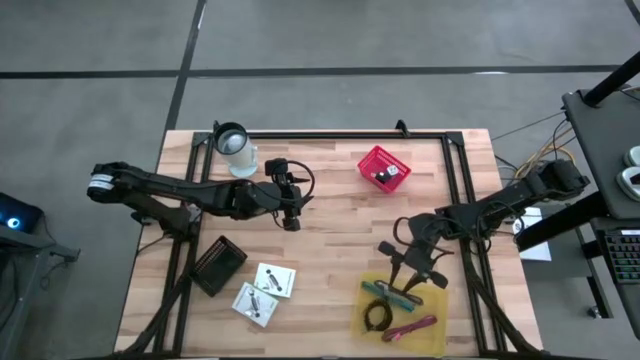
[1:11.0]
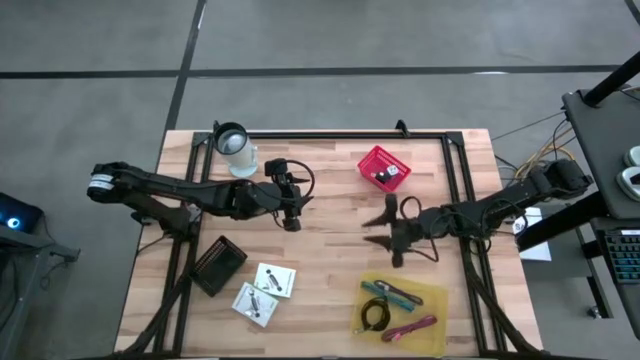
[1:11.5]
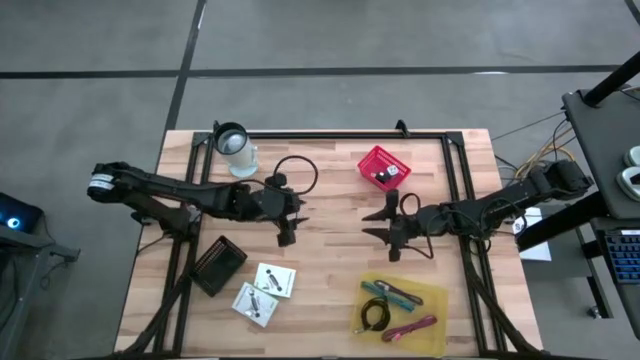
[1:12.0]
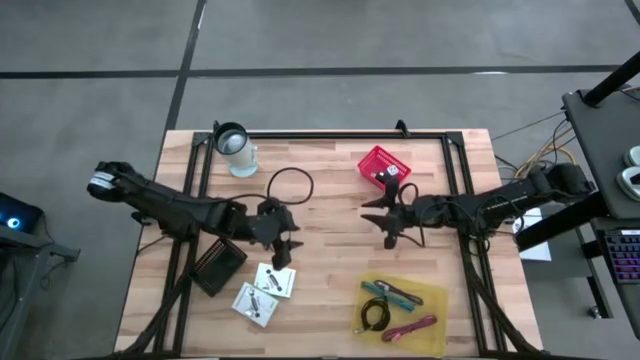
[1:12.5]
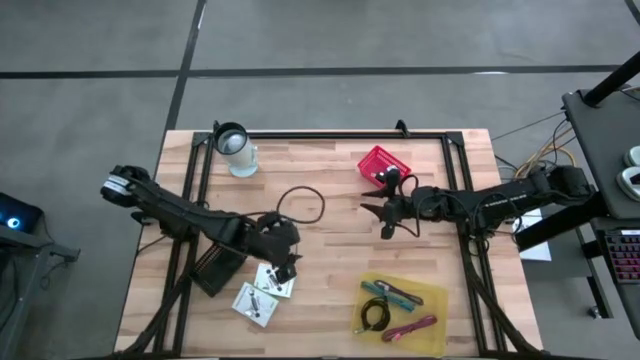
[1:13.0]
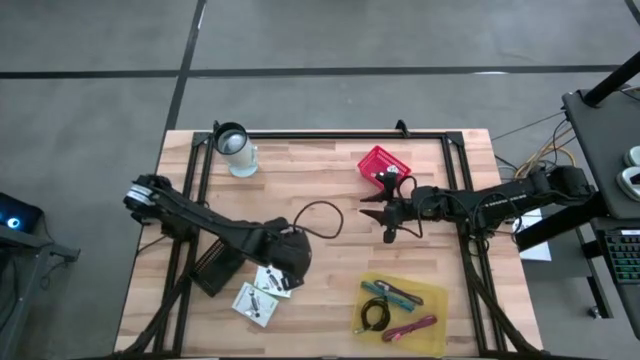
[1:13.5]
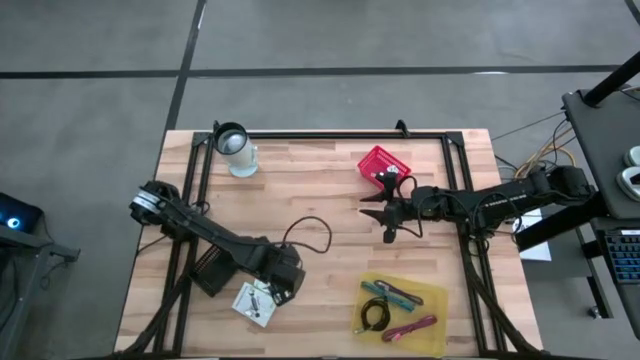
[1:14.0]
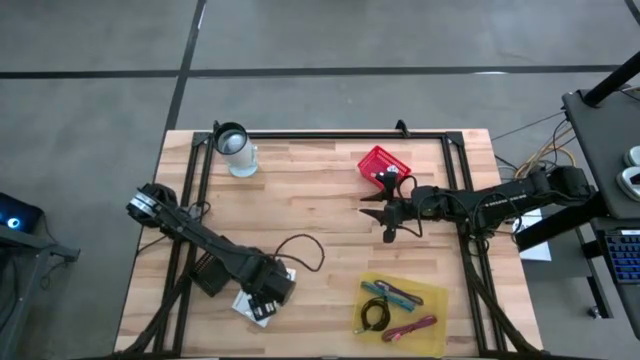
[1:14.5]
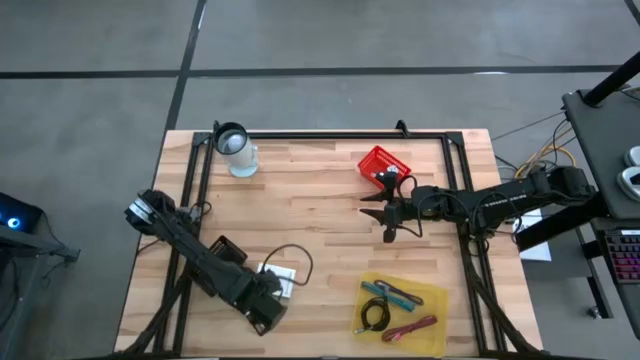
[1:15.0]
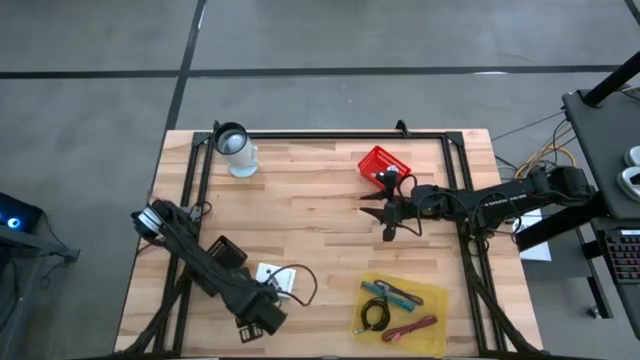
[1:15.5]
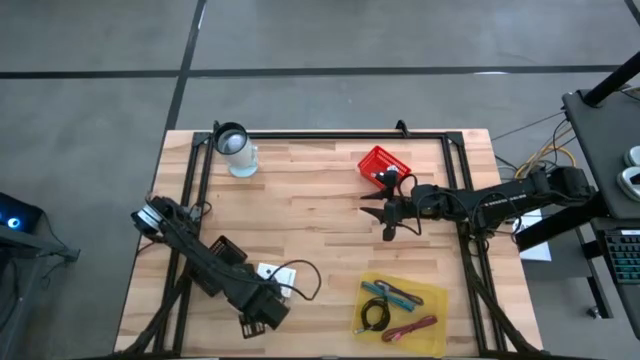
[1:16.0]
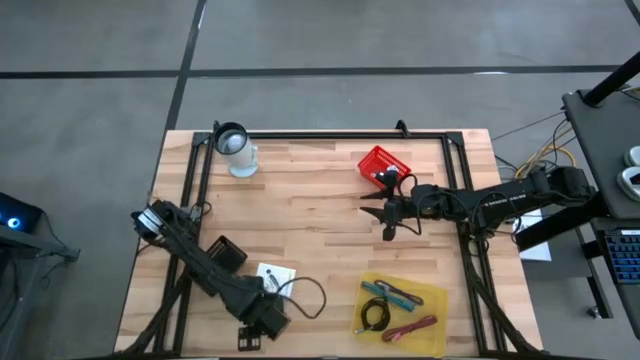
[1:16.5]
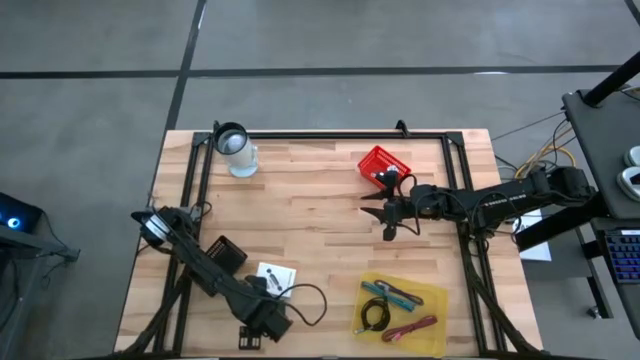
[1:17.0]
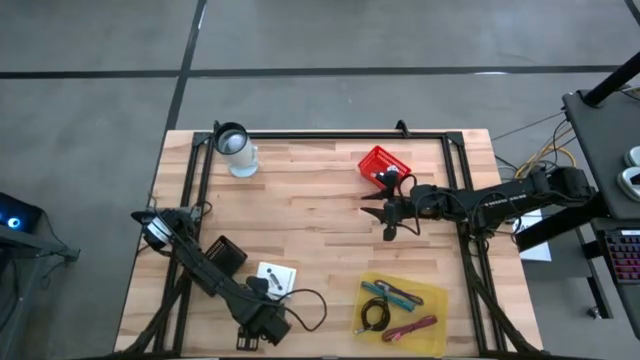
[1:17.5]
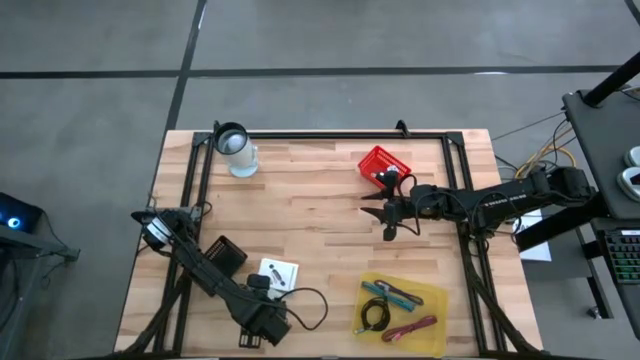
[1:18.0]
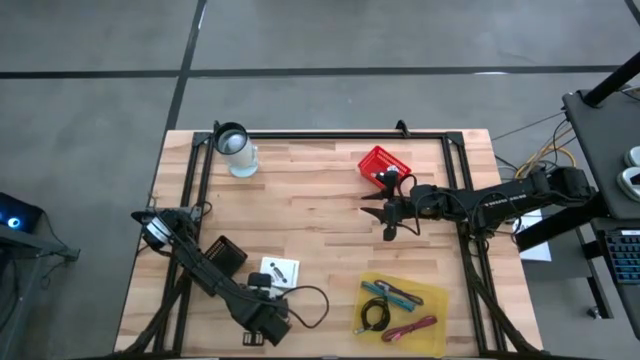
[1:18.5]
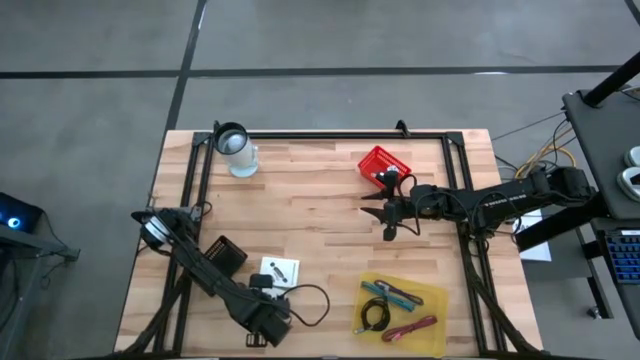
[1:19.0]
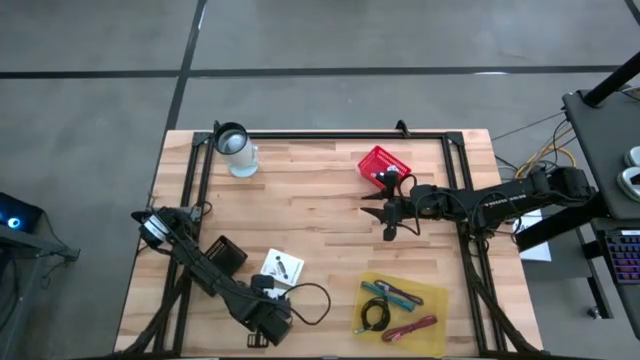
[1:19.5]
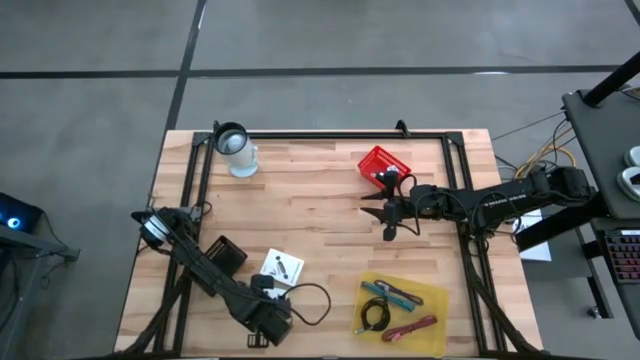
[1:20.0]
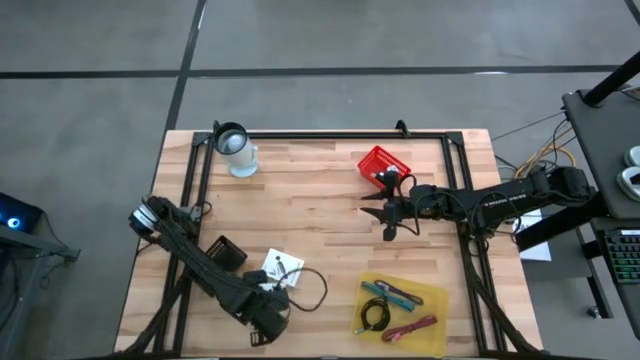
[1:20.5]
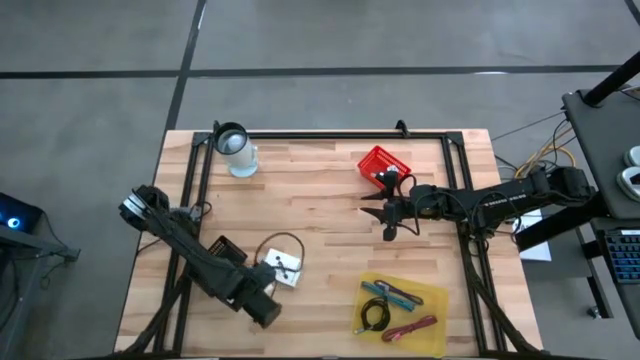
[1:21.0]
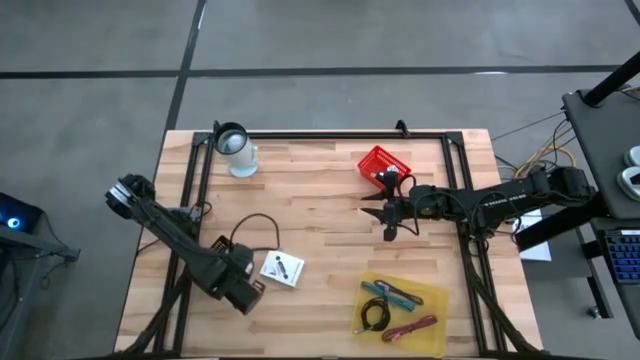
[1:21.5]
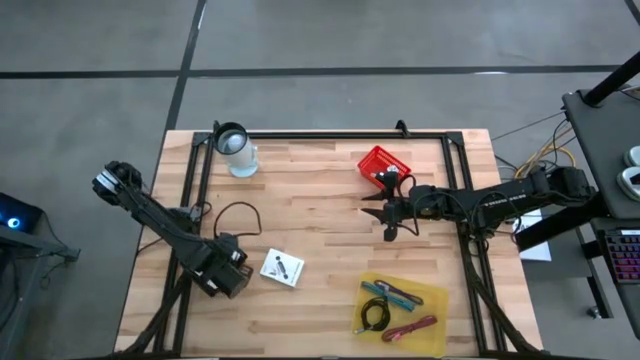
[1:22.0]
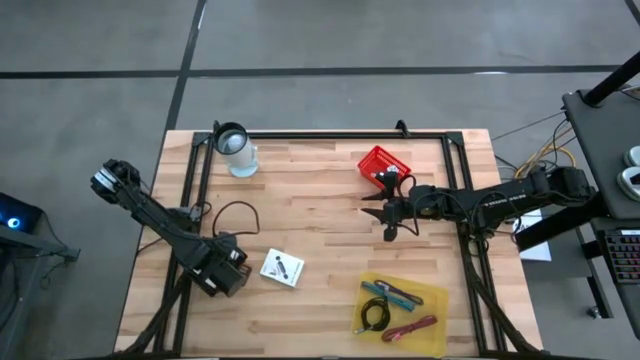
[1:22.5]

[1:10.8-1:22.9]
Task: Pick and place items into bin
Put the bottom white card reader box into the black bin

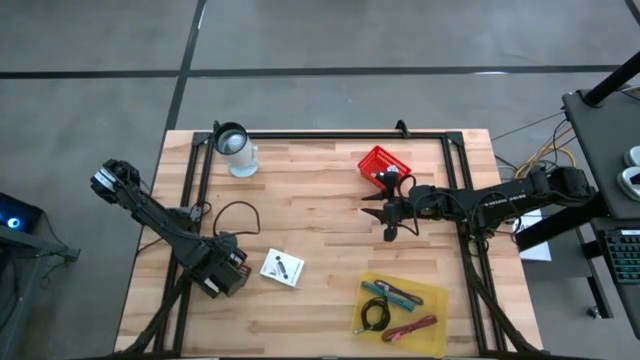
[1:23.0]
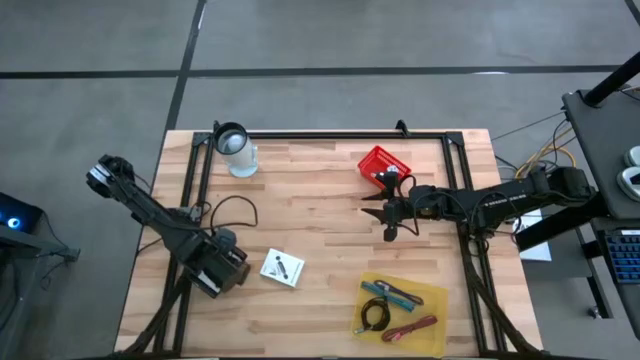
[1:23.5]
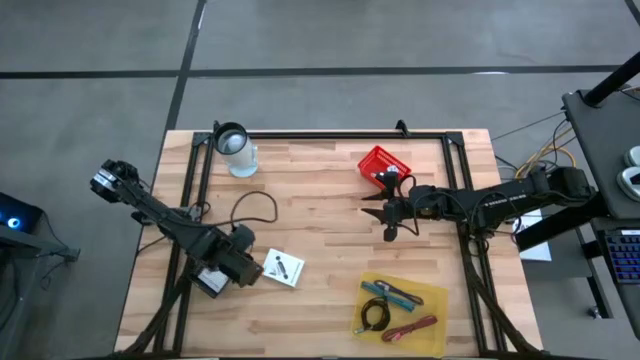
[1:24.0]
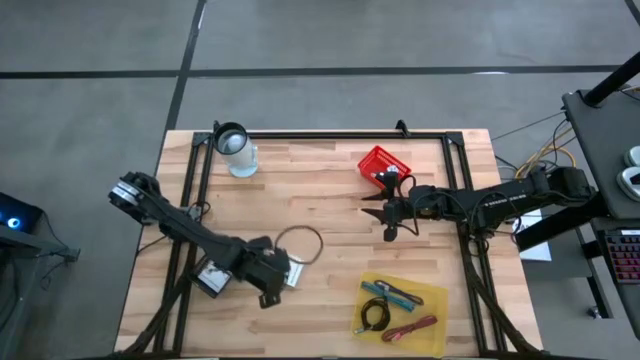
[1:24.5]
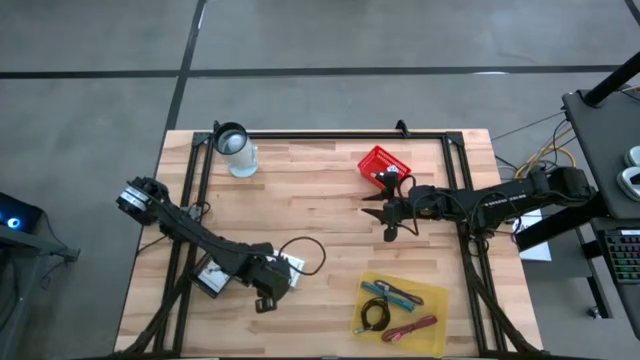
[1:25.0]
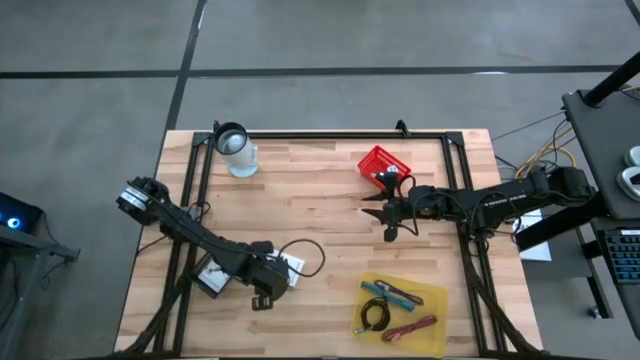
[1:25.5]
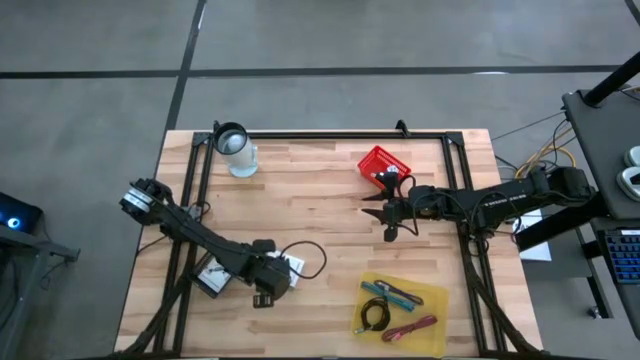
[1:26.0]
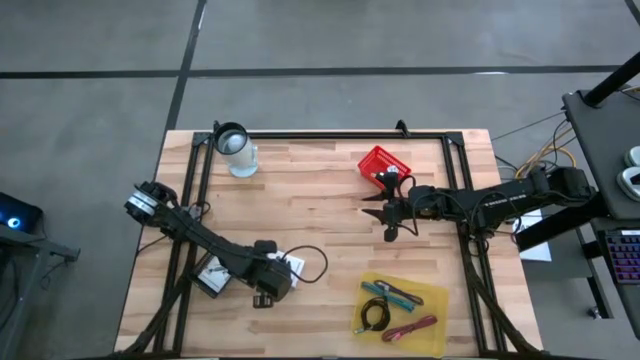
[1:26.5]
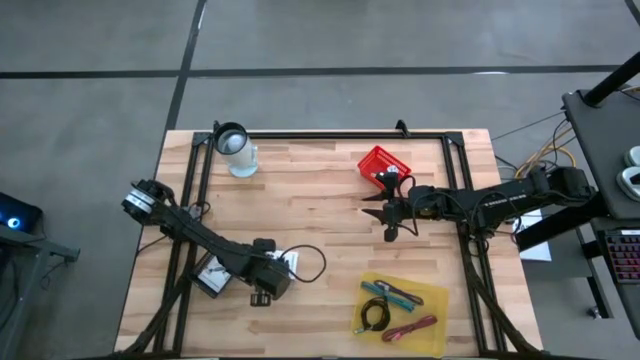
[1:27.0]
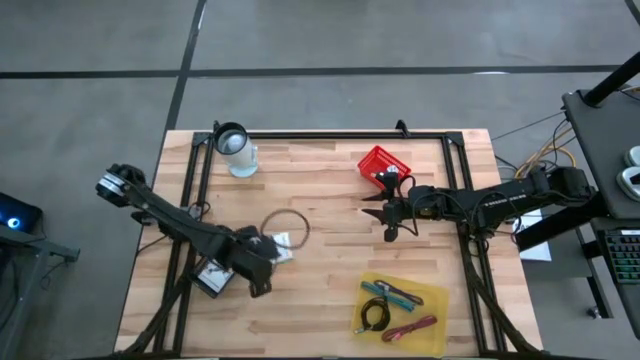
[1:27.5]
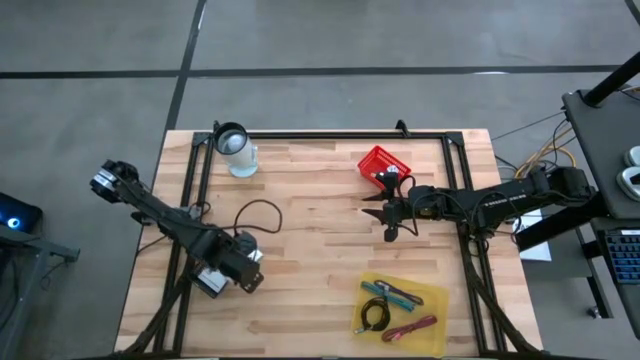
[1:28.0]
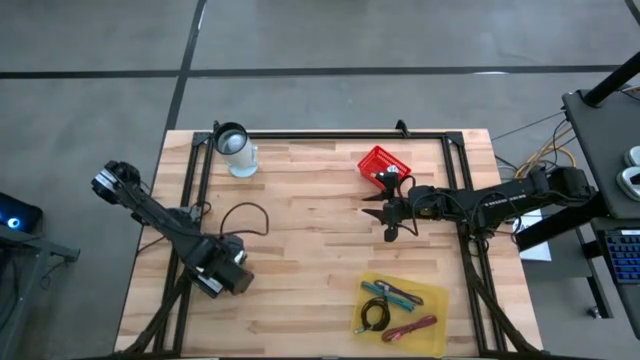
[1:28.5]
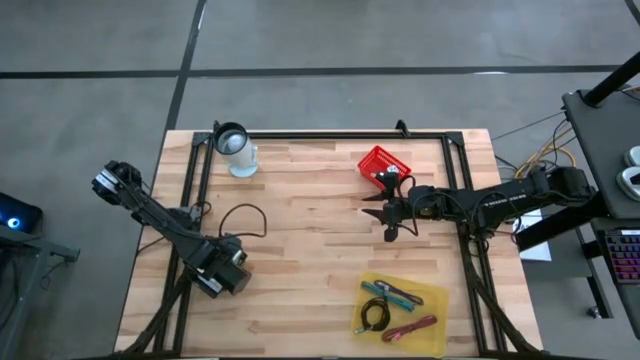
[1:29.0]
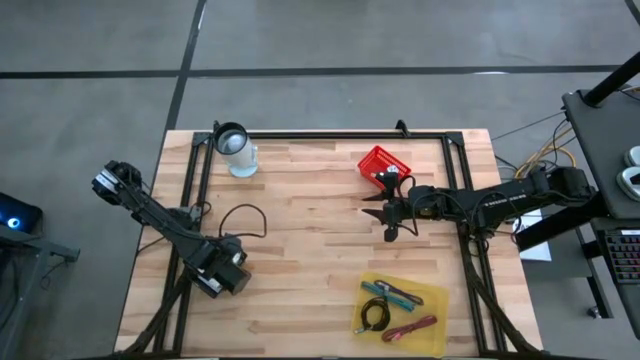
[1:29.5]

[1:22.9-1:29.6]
Put the white card reader box into the black bin

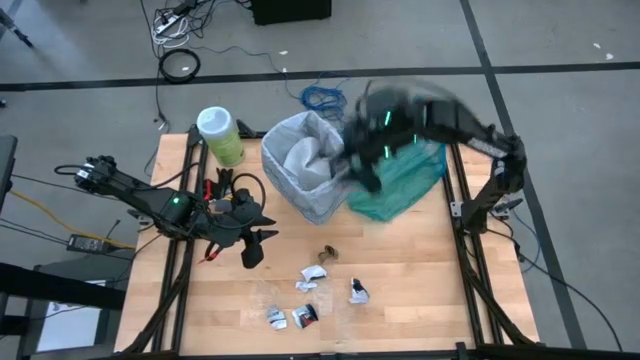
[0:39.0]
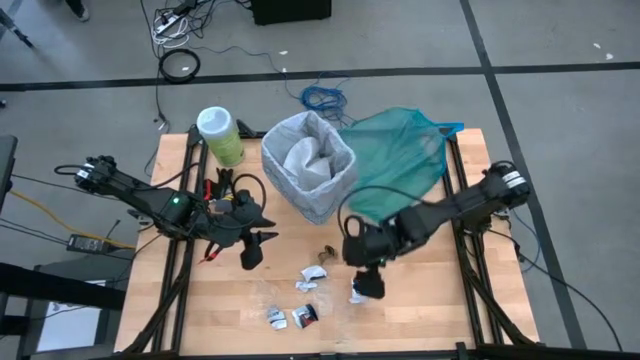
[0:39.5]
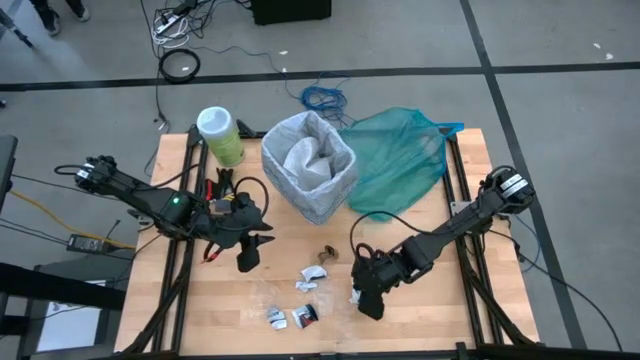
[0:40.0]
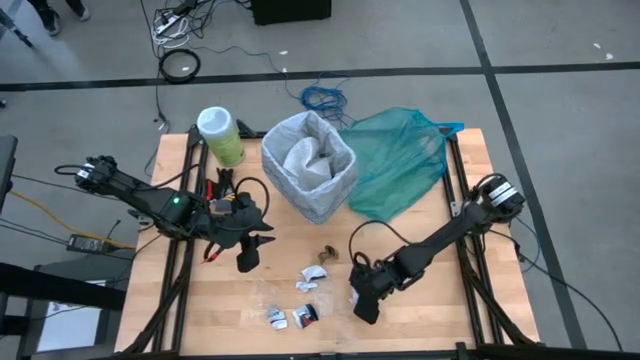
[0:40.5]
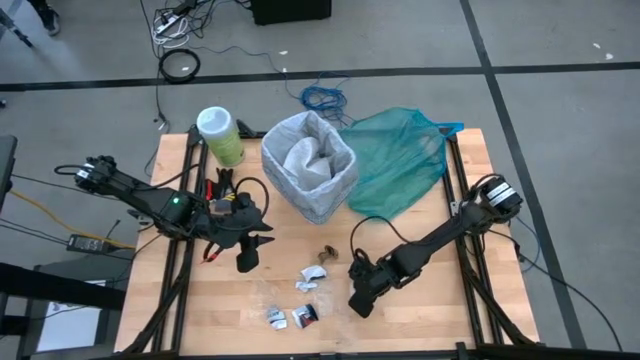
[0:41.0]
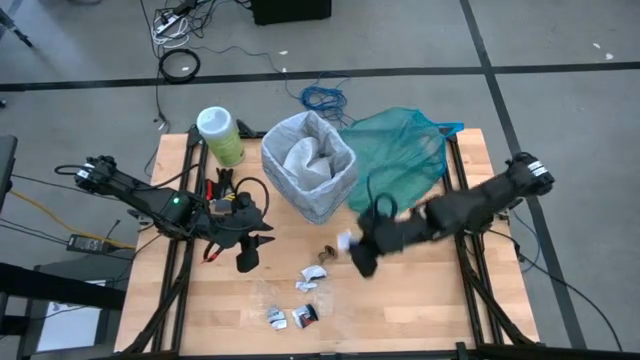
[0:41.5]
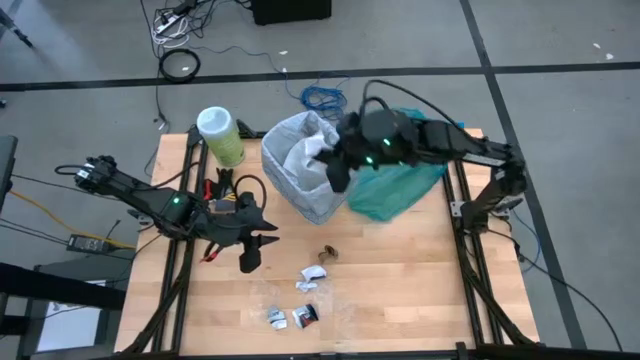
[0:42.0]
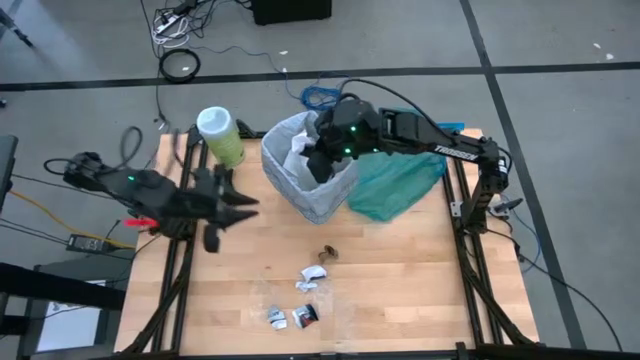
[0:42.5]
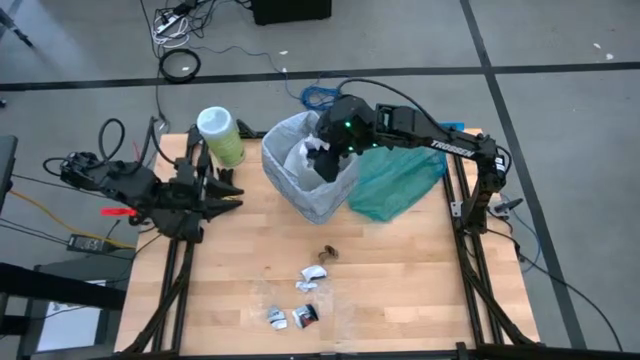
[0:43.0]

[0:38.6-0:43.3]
Task: place trash/remove bag and relplace
Put the dark blue paper into the trash bin
